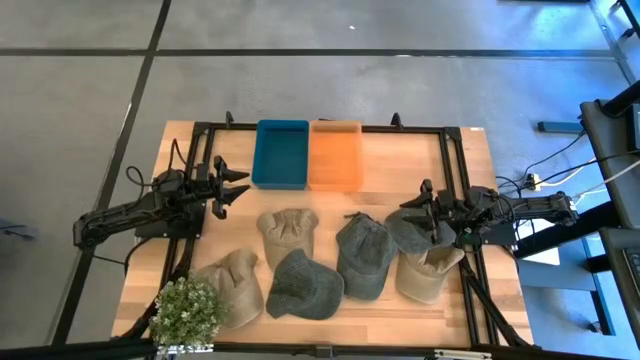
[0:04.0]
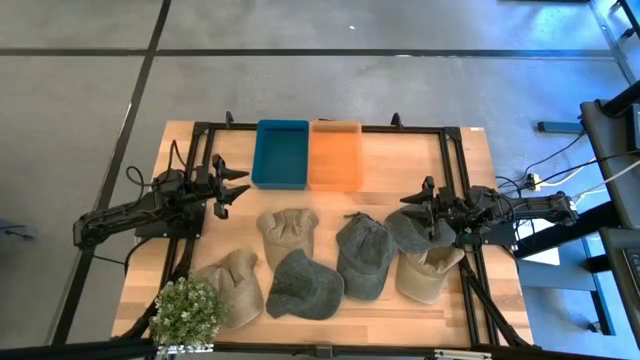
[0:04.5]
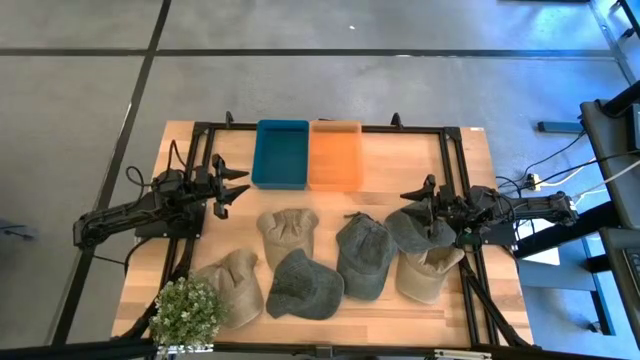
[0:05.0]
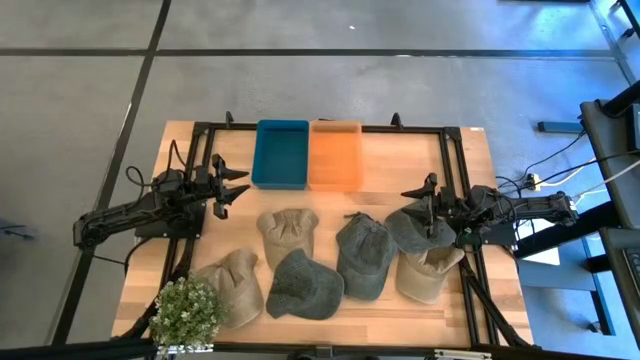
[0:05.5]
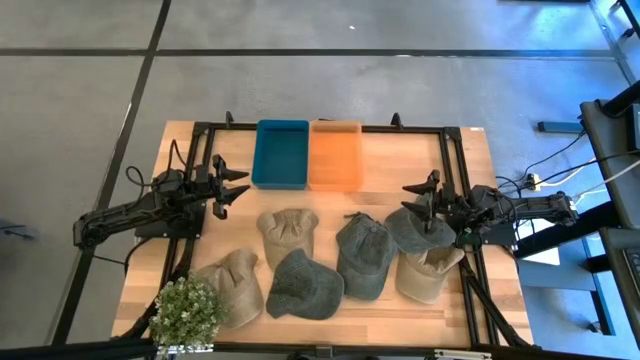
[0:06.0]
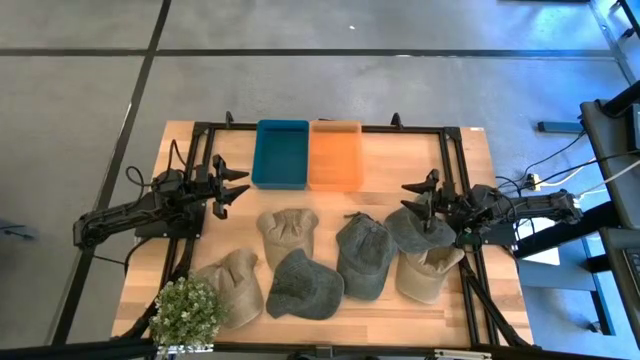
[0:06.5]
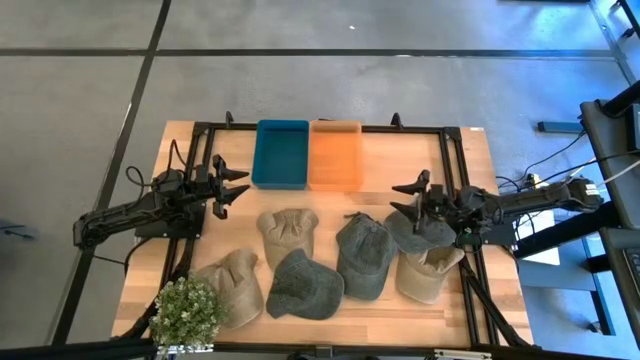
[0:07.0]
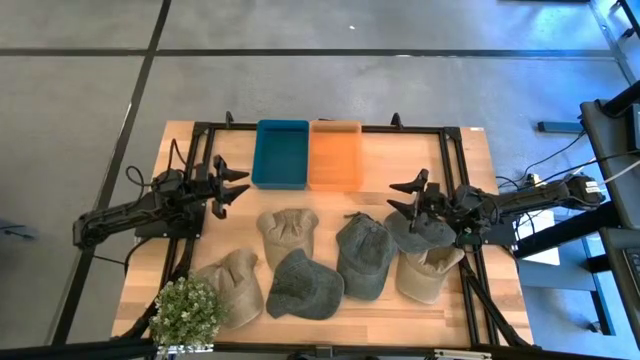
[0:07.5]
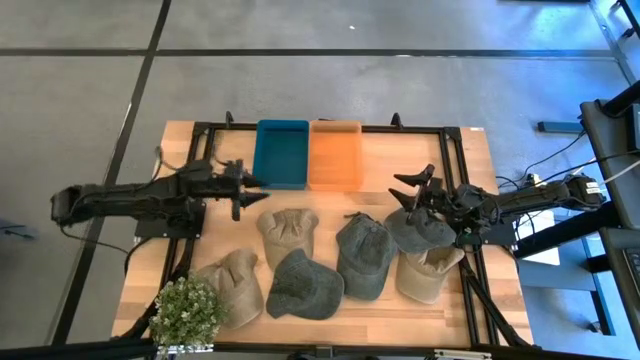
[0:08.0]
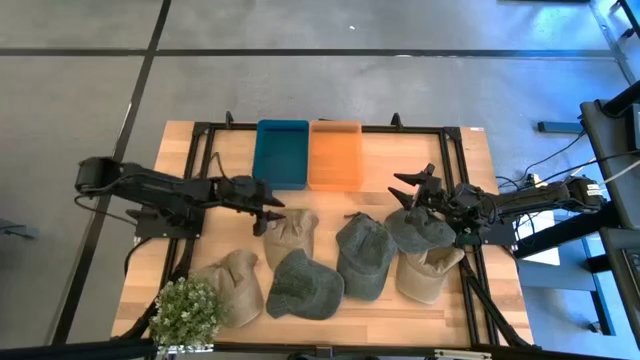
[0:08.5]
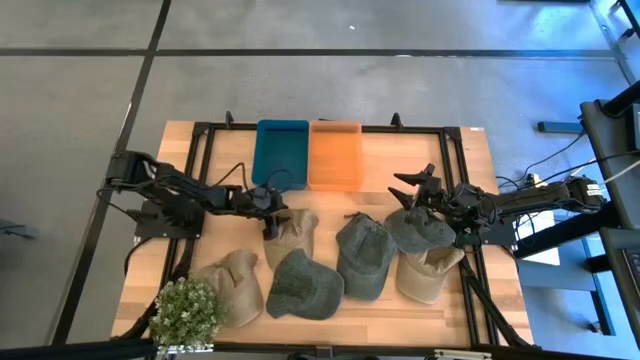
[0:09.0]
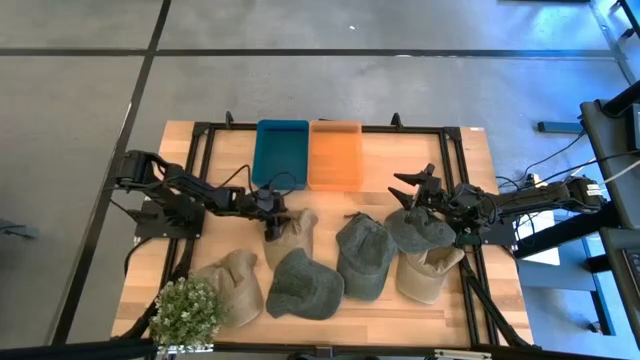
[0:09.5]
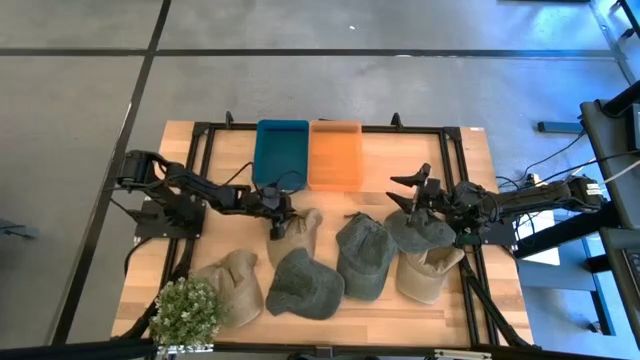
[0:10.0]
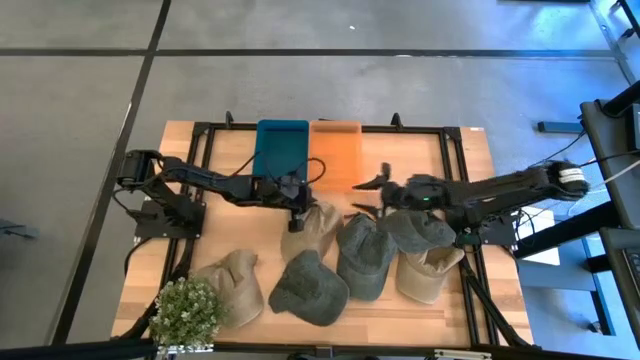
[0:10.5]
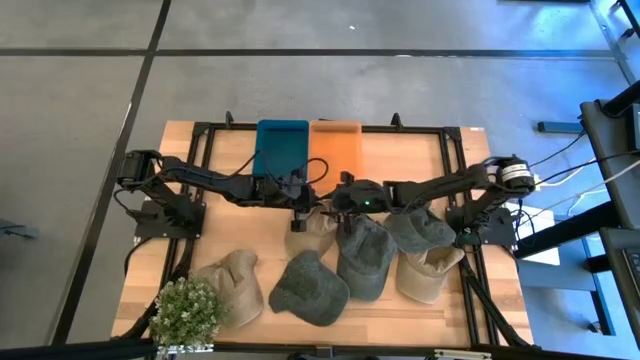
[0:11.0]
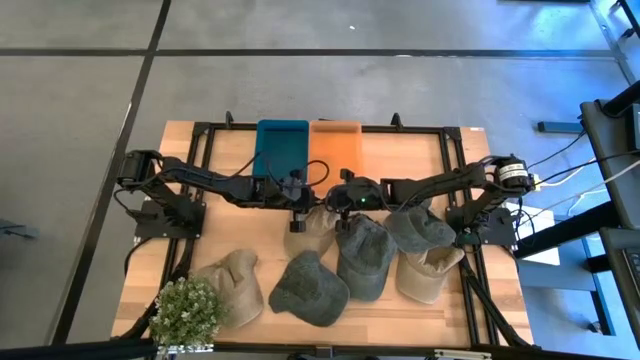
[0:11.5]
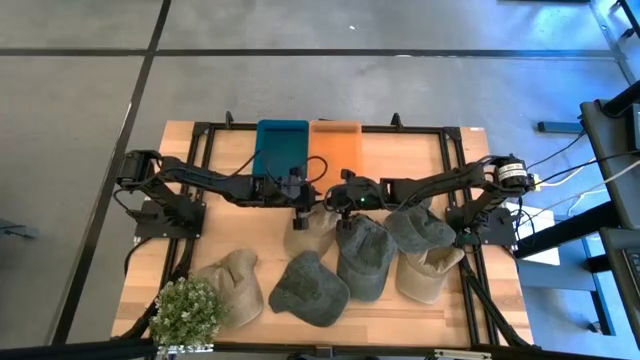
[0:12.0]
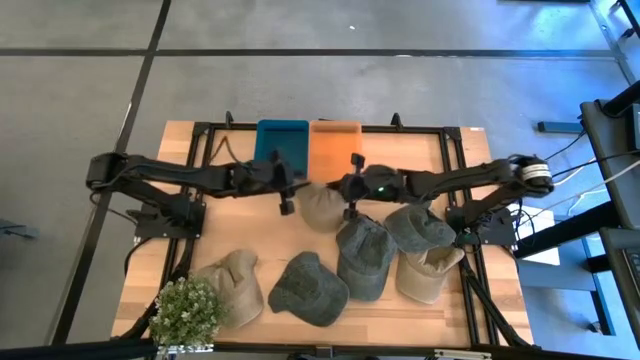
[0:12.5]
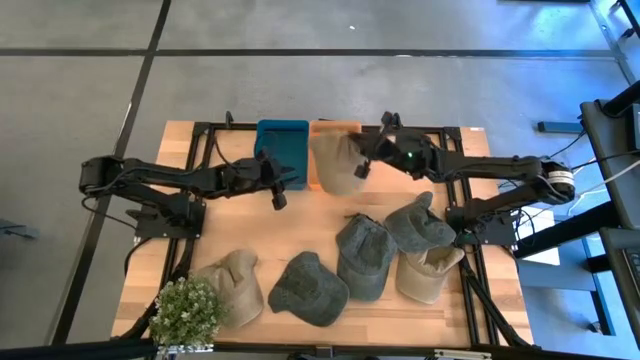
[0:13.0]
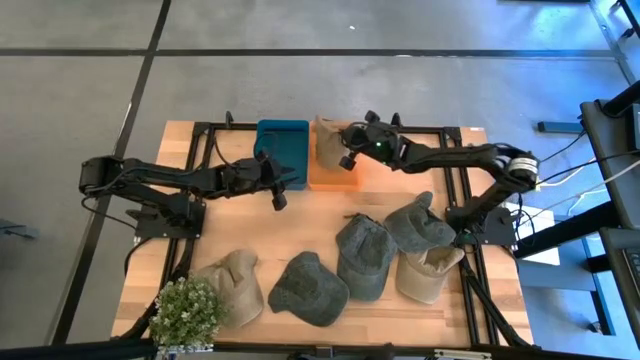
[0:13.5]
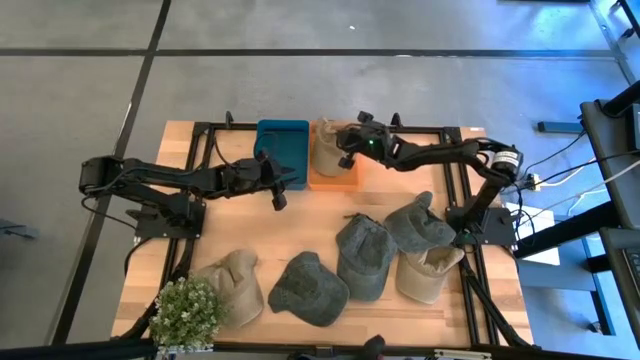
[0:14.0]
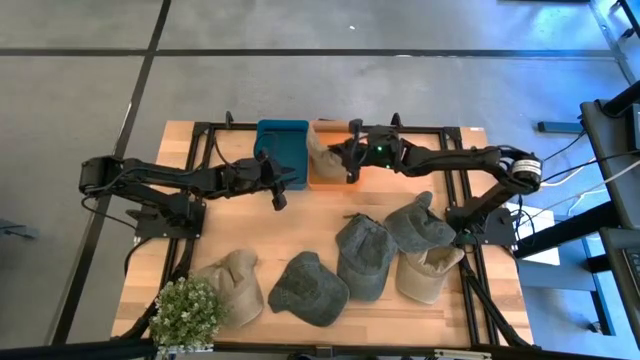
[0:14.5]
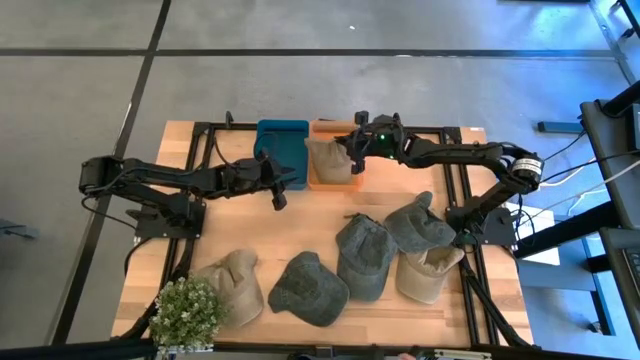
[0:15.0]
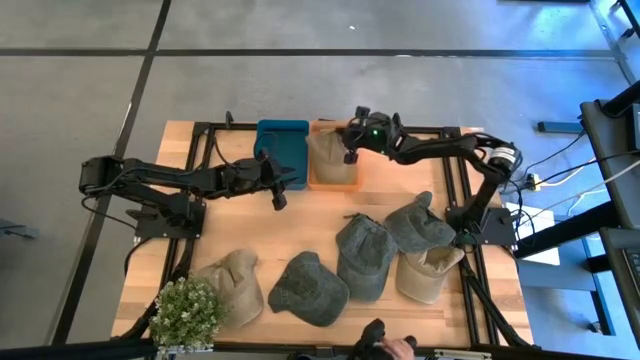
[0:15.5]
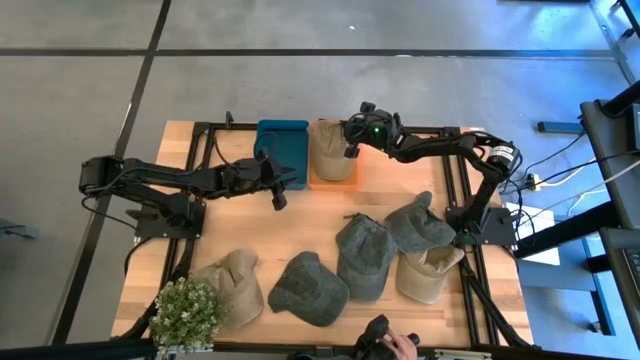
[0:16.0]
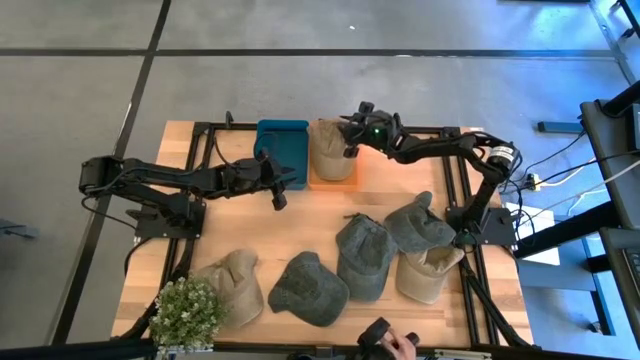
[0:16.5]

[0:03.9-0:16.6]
Task: Pick & Place hat
Put the middle brown cap into the orange bin

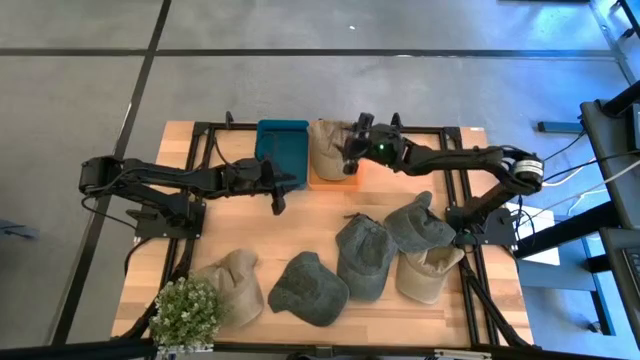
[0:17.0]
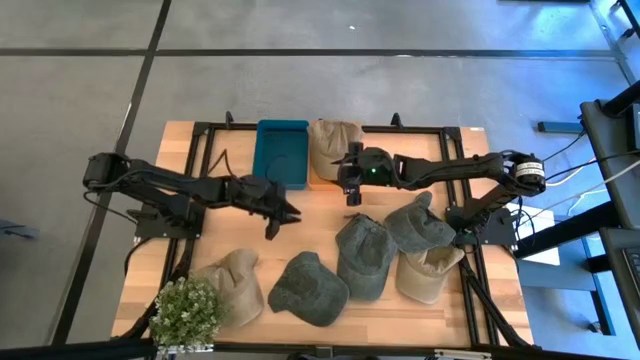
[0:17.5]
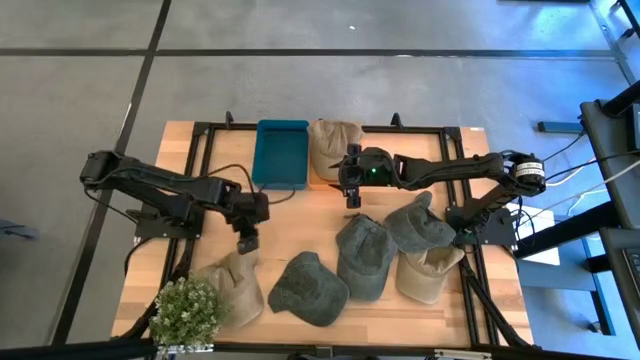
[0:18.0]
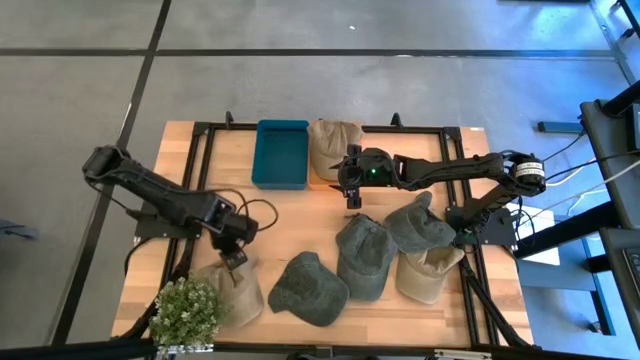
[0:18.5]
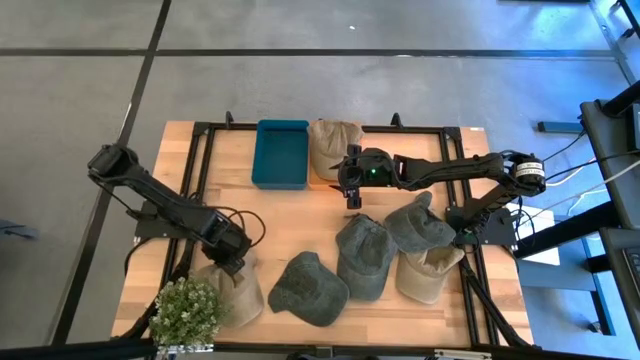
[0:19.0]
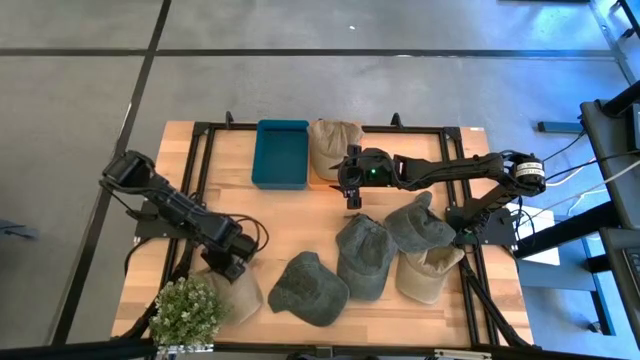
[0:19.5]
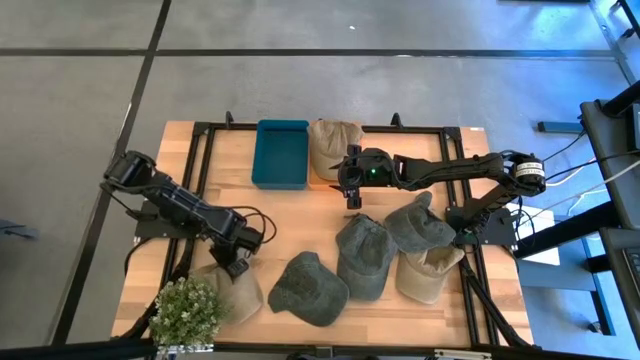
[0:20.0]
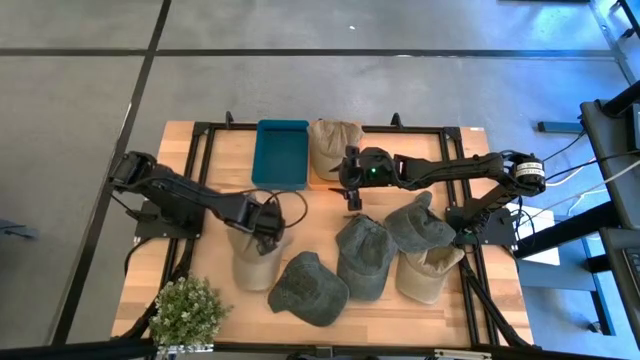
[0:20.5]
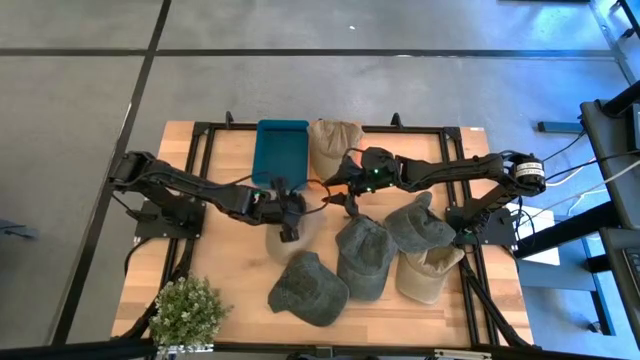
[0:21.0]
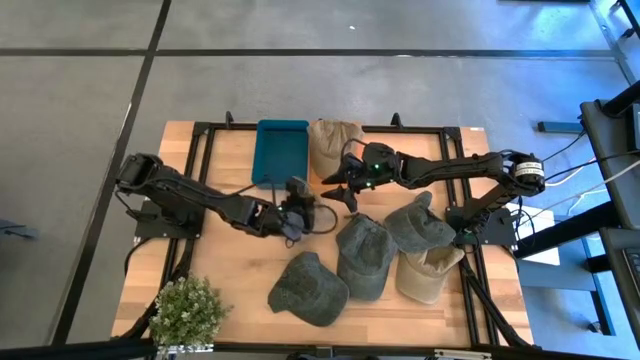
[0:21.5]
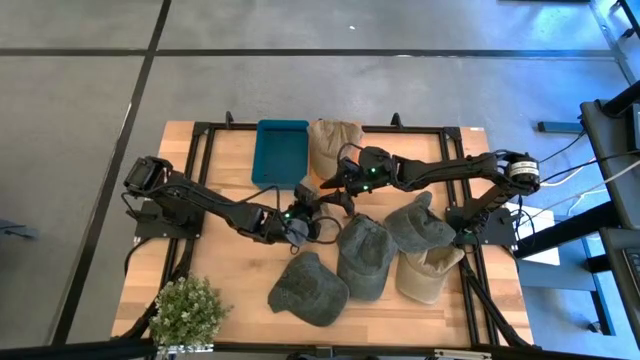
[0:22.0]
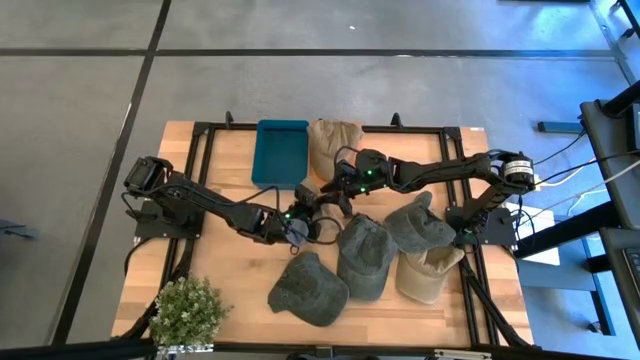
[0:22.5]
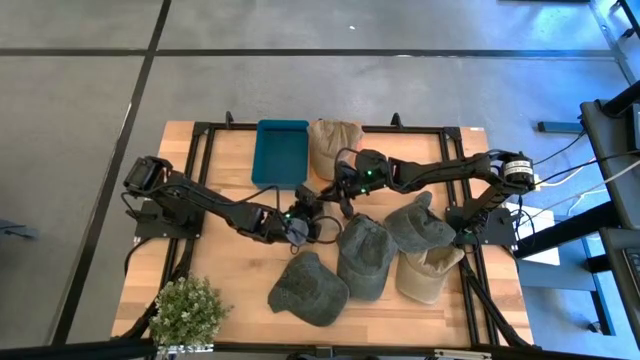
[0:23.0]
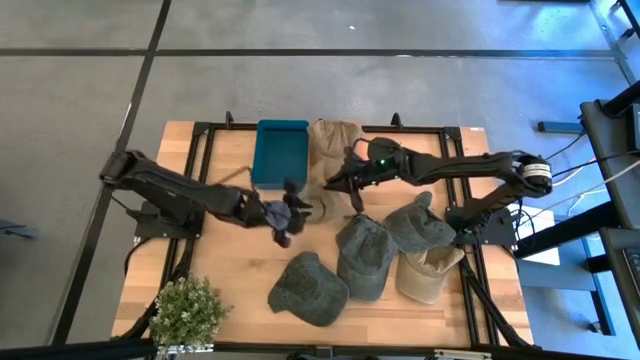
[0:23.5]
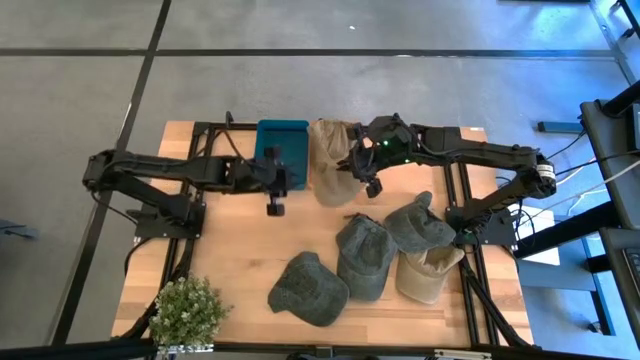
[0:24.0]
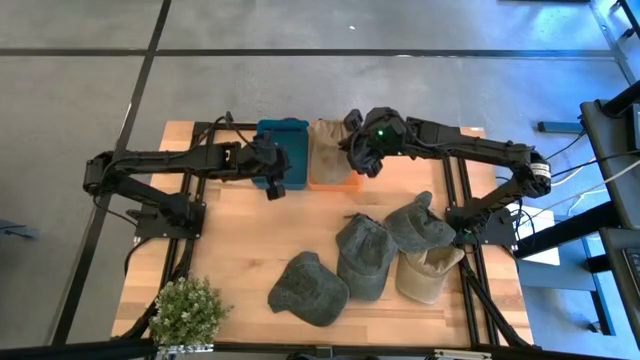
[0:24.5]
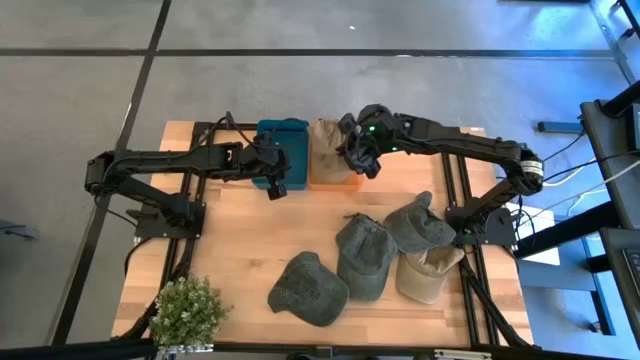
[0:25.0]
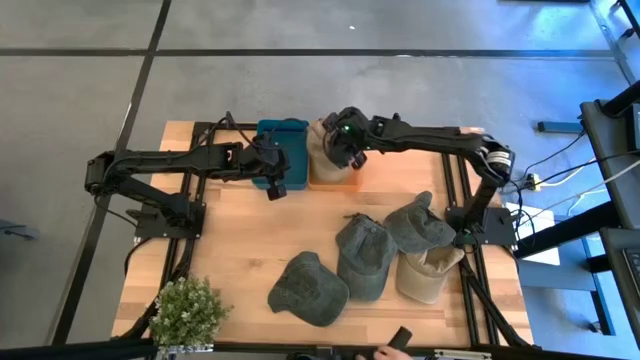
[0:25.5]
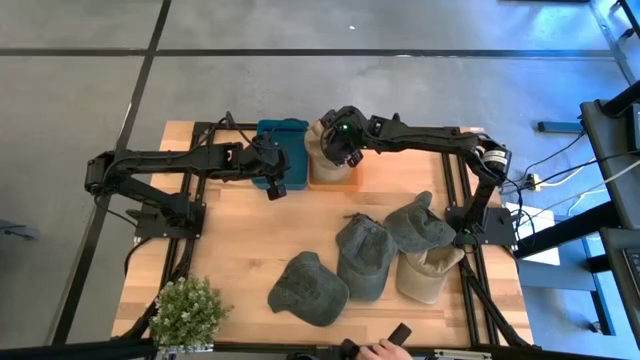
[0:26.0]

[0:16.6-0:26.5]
Put the left brown cap into the orange bin
